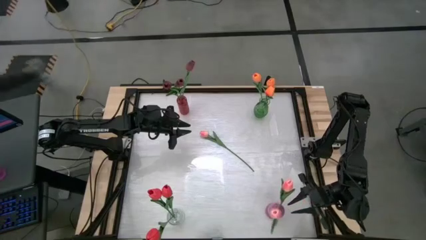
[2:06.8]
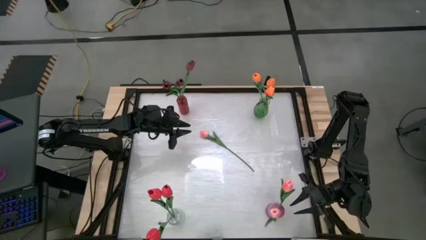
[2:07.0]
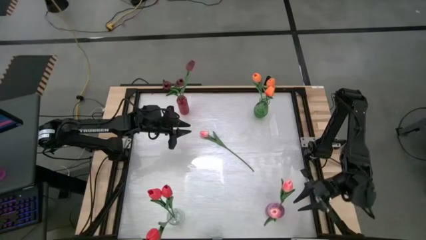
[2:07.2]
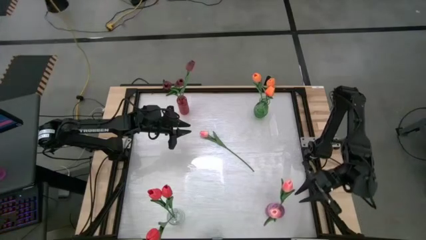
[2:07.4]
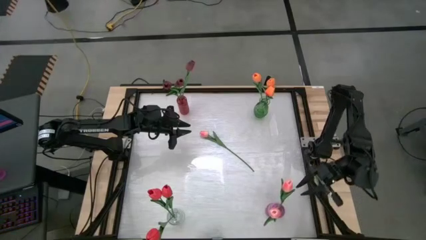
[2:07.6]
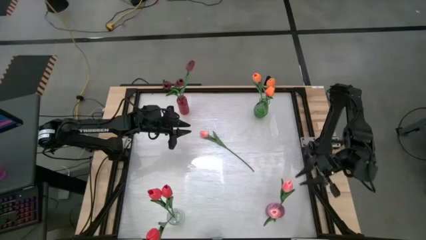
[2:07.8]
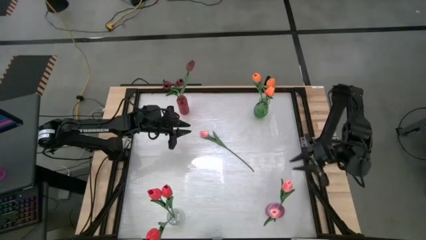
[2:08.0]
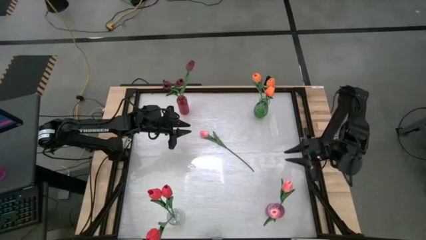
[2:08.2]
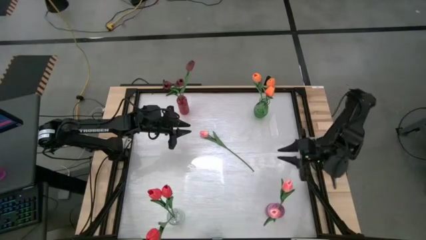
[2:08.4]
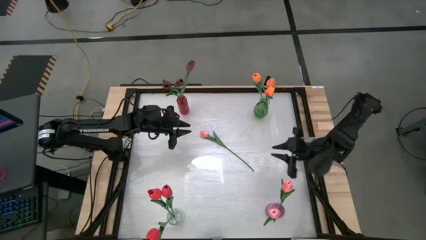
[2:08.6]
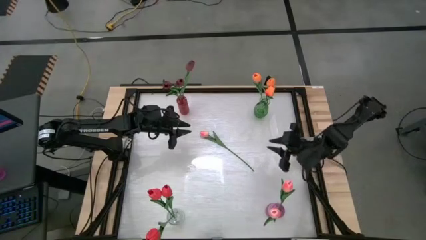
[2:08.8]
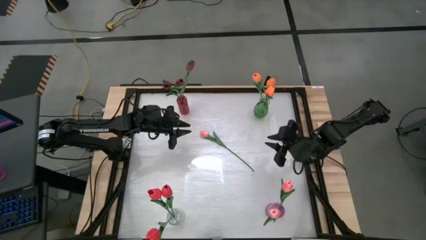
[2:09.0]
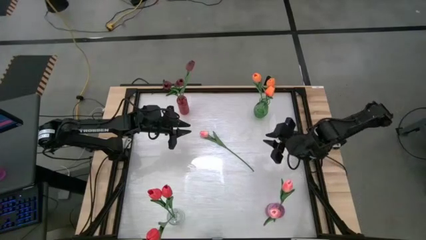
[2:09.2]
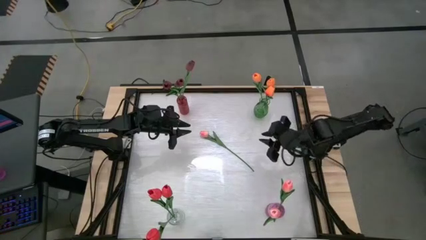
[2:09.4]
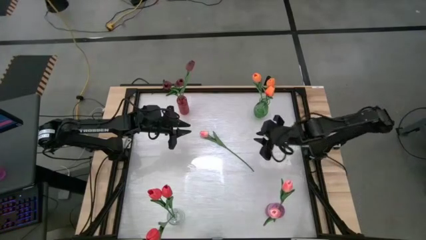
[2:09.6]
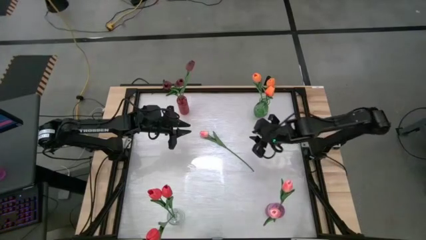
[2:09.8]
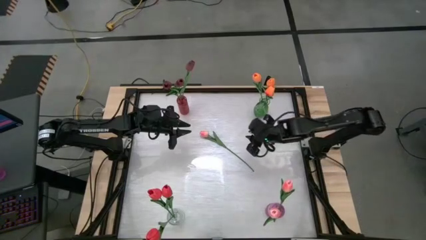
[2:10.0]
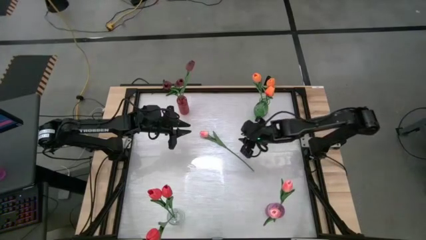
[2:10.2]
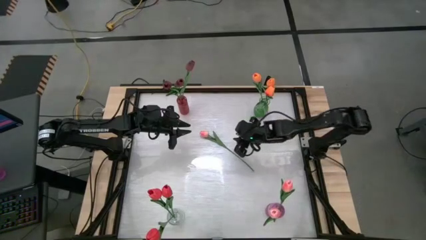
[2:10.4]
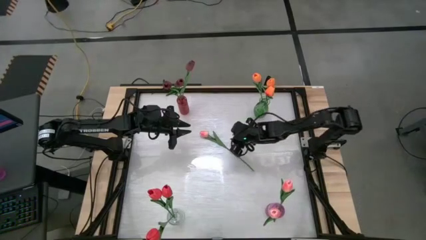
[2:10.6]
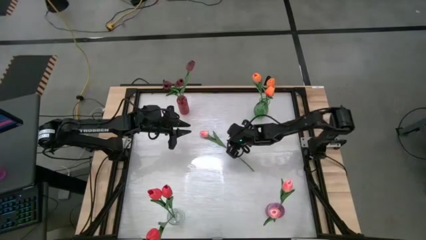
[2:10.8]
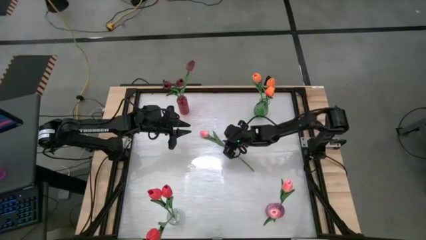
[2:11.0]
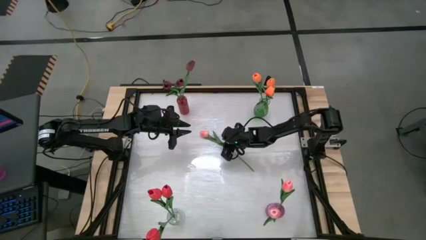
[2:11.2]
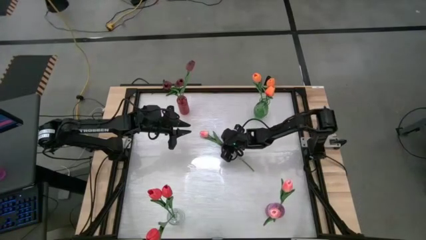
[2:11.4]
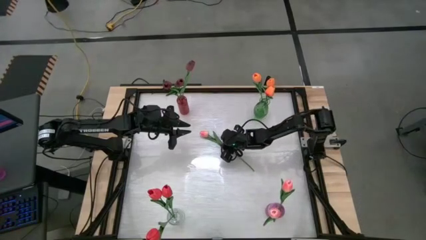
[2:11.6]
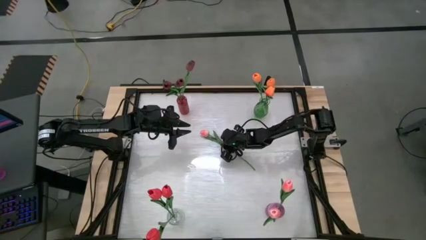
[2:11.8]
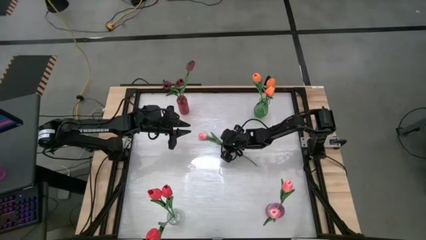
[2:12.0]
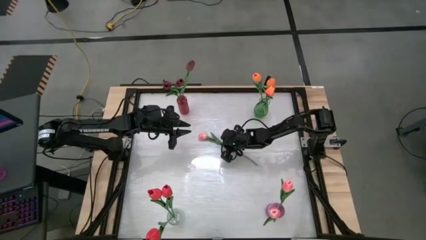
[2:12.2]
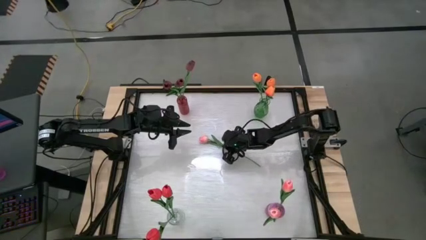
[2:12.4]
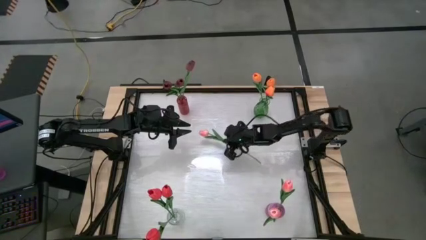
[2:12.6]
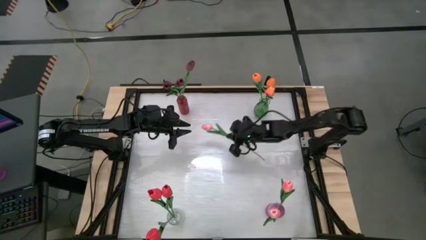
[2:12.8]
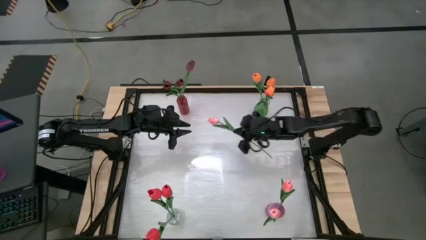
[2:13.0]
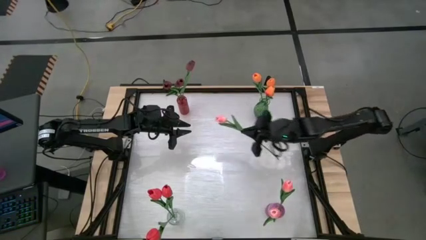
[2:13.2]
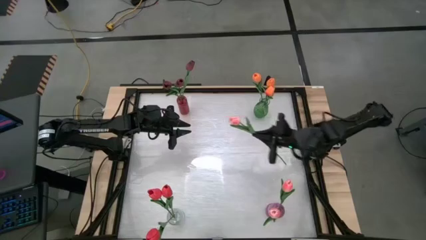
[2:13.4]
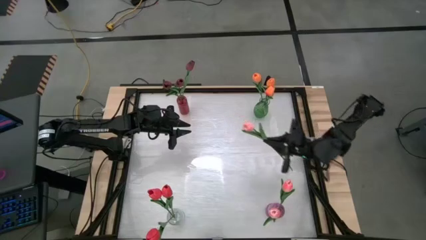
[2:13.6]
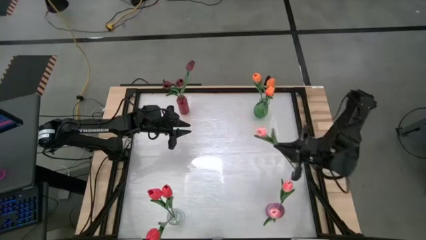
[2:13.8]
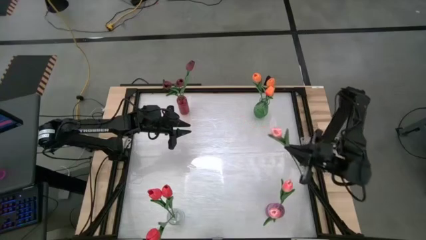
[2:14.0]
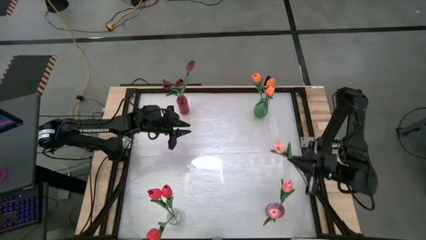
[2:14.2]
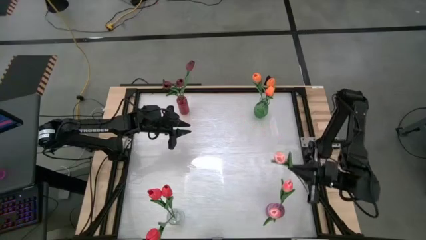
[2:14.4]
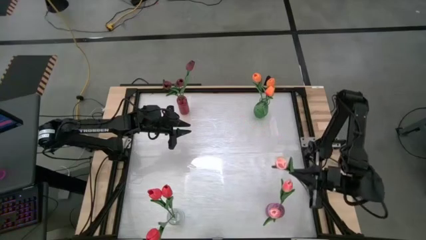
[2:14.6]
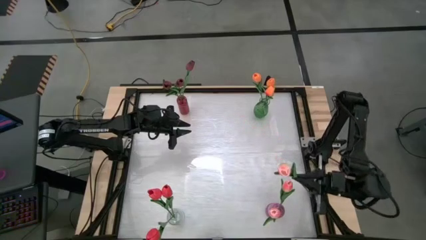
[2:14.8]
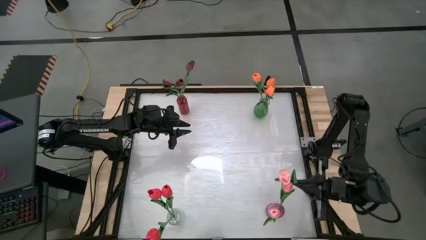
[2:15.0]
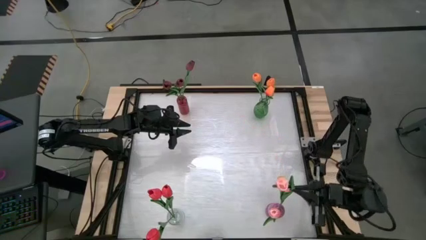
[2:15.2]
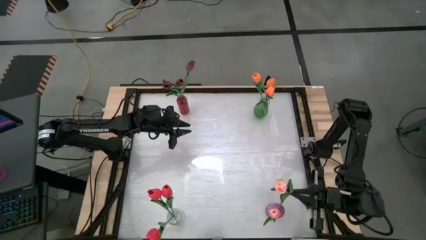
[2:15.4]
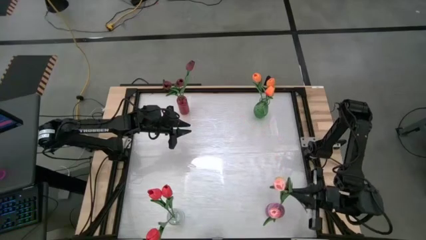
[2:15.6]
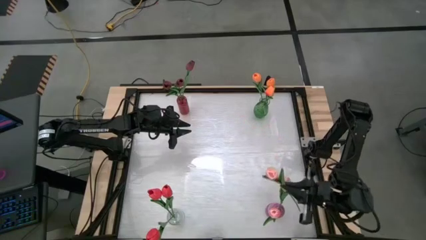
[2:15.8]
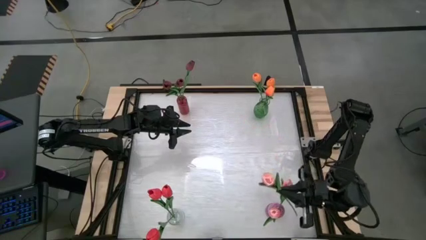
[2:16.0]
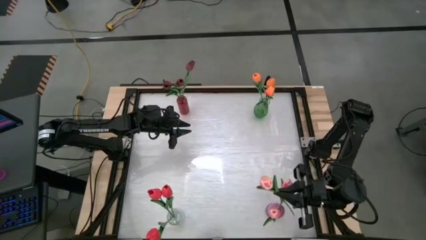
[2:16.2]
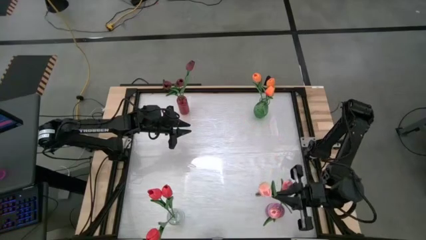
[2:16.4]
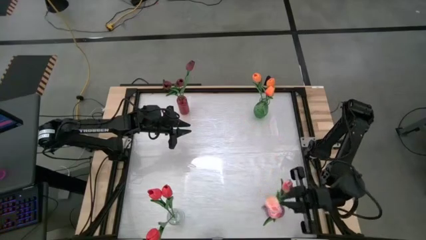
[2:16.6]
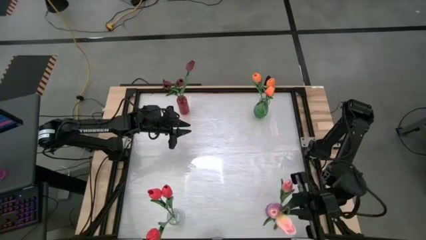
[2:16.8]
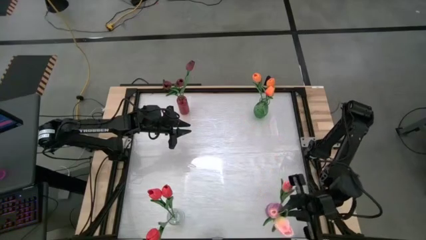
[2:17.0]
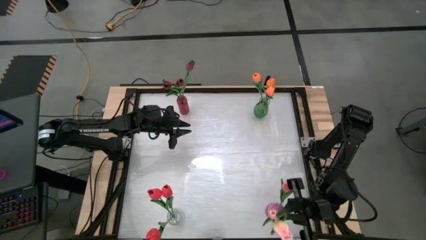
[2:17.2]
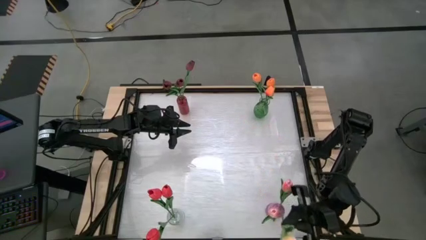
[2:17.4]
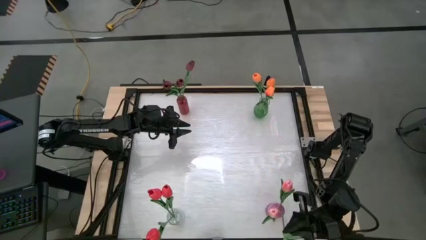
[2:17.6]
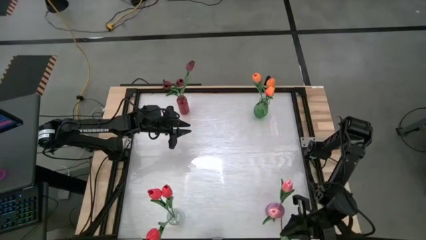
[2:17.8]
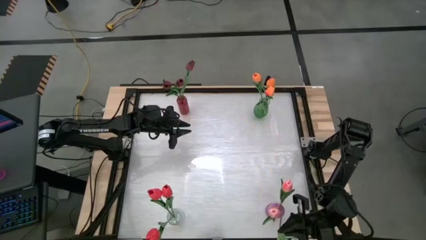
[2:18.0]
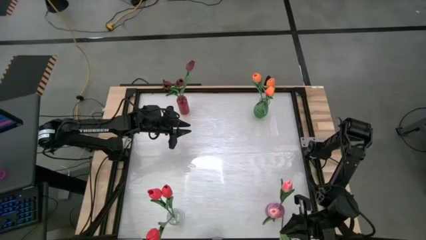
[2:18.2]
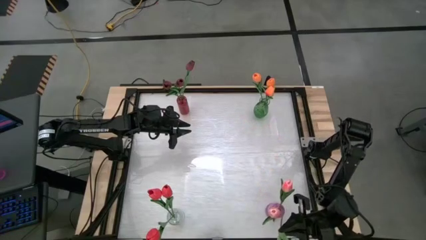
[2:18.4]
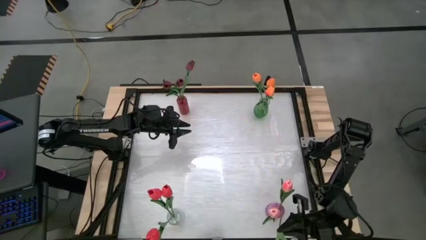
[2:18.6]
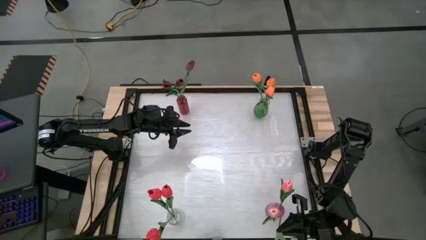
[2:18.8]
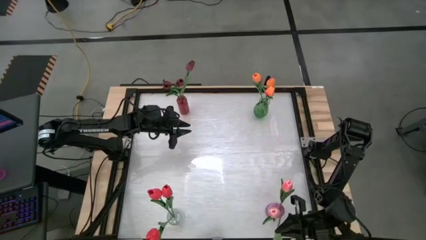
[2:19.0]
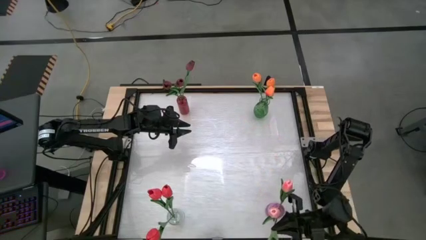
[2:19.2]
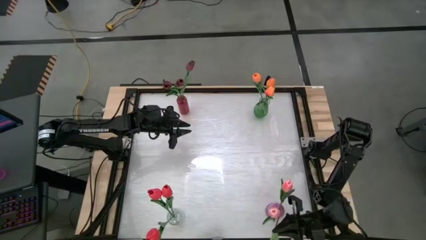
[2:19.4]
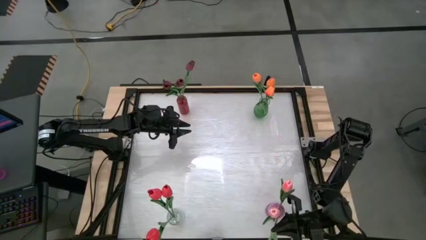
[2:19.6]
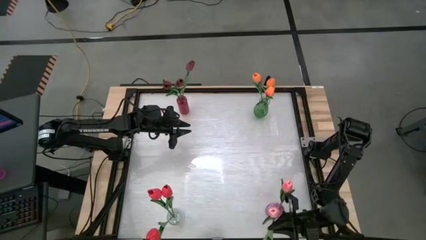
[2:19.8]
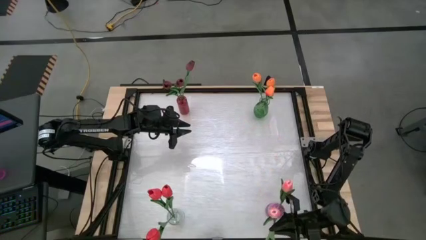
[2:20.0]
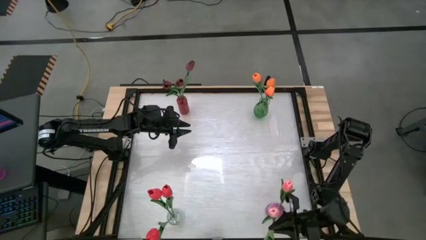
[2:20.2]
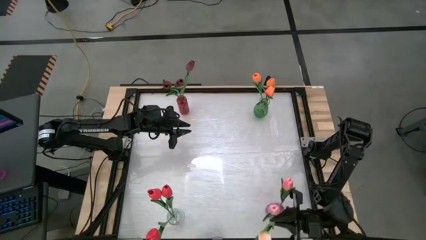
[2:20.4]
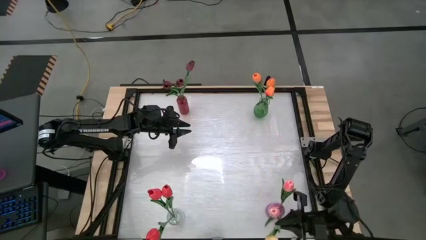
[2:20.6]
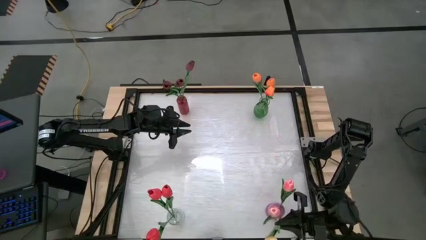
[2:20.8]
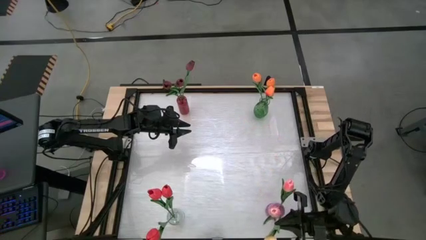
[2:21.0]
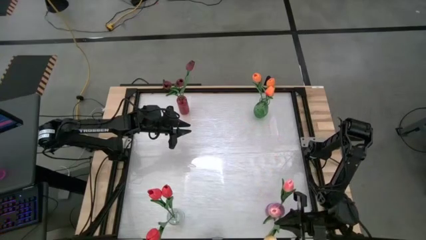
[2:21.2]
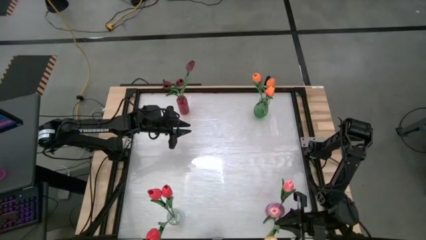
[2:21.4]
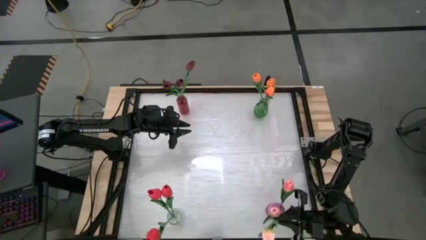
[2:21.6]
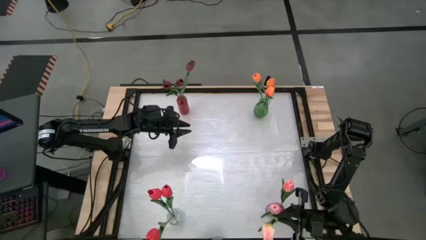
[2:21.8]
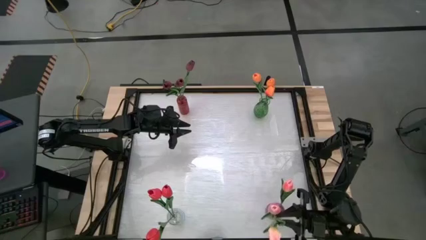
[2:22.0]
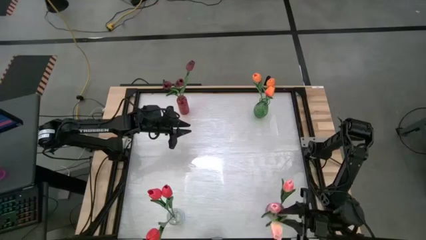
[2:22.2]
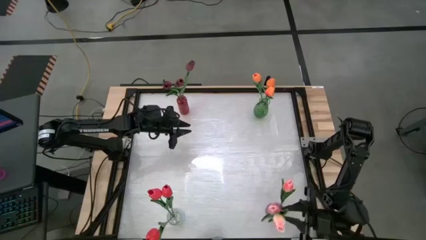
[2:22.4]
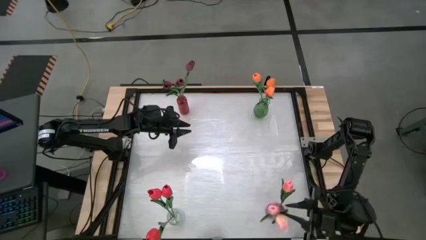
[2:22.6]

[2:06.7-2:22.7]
Task: Sort flowers into vase by color
Put the pink flower into the purple vase
